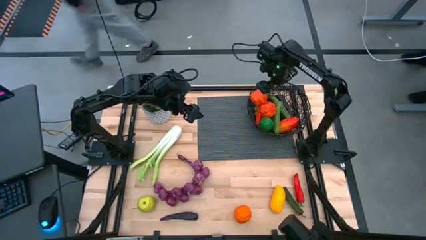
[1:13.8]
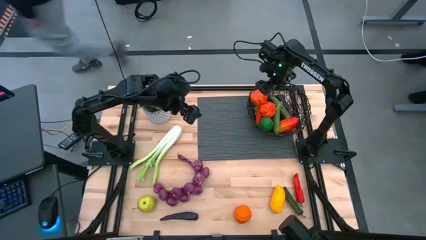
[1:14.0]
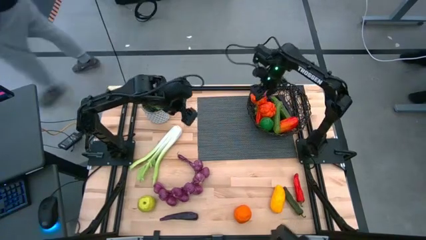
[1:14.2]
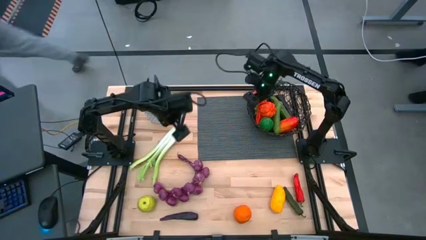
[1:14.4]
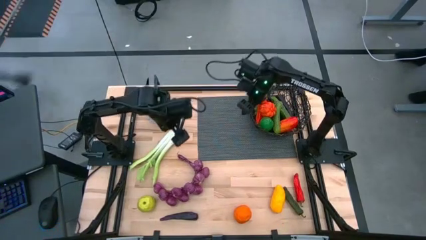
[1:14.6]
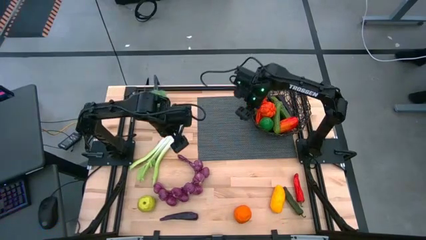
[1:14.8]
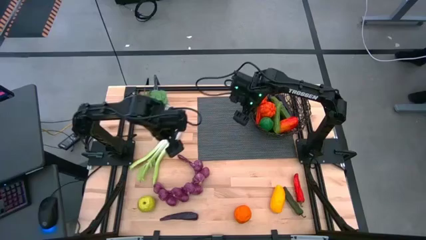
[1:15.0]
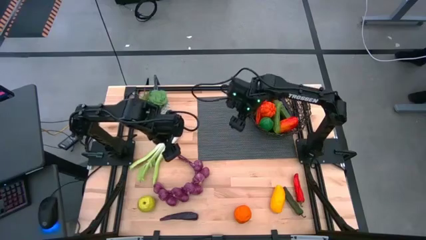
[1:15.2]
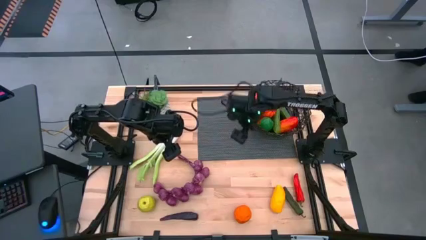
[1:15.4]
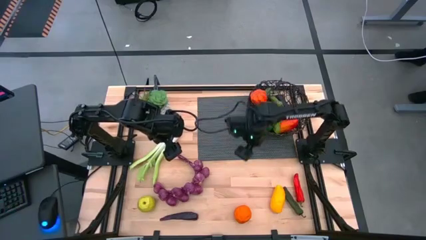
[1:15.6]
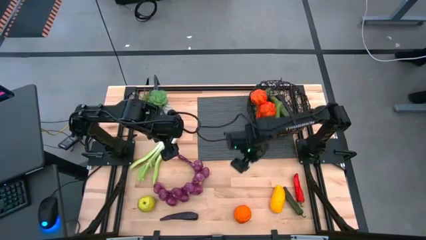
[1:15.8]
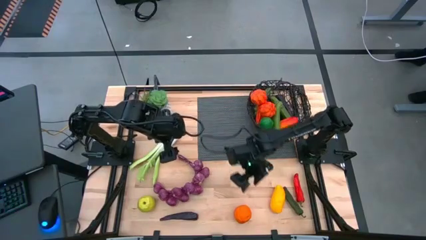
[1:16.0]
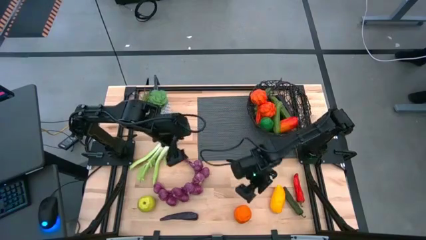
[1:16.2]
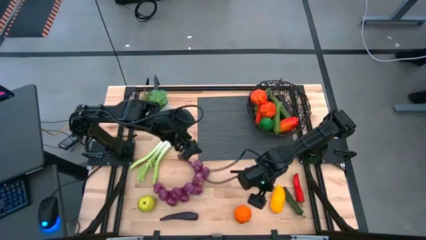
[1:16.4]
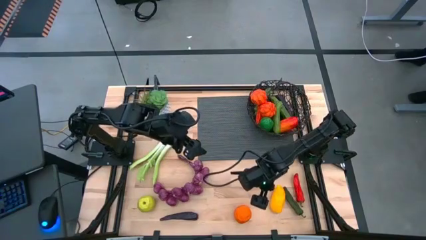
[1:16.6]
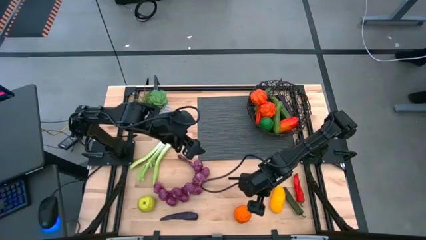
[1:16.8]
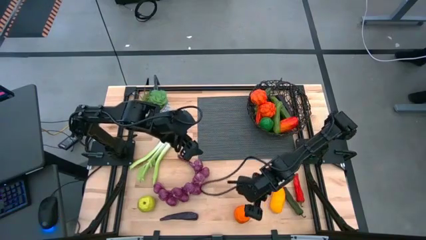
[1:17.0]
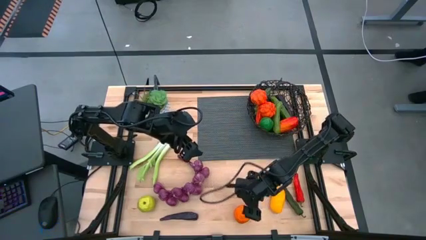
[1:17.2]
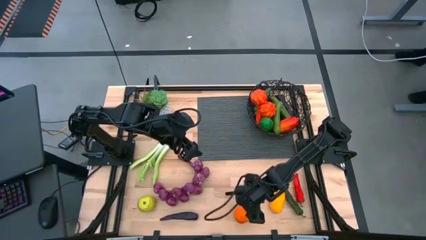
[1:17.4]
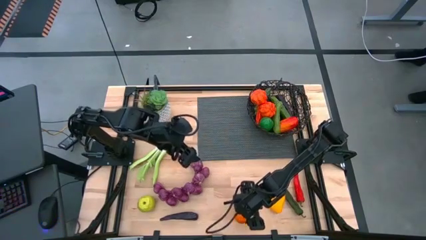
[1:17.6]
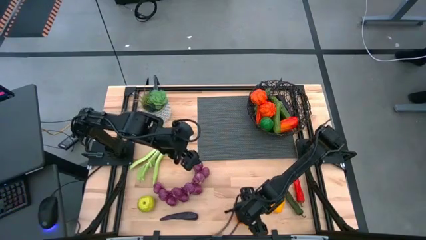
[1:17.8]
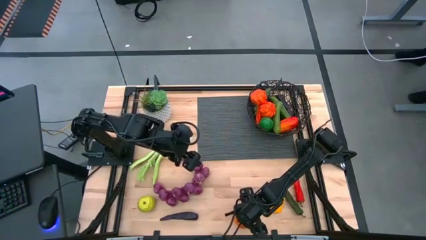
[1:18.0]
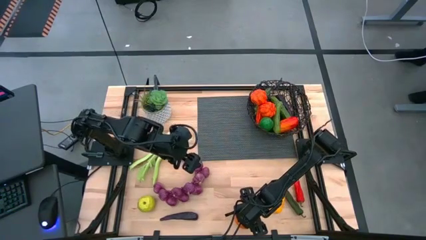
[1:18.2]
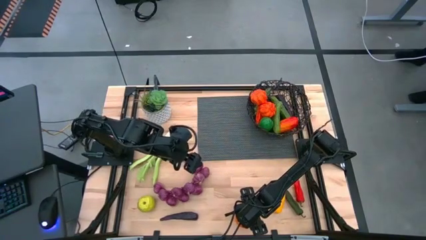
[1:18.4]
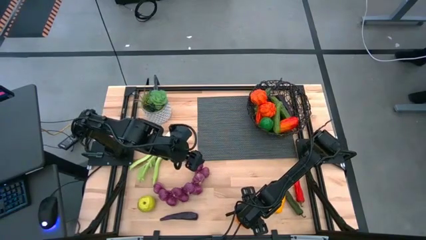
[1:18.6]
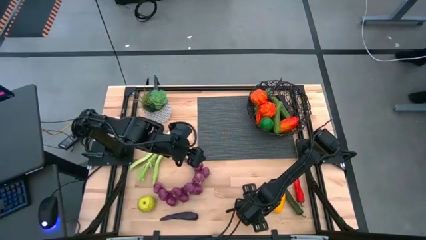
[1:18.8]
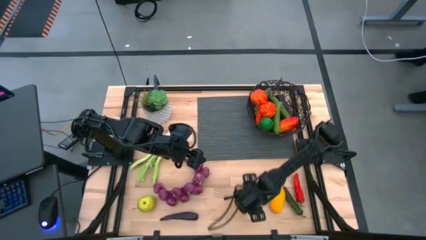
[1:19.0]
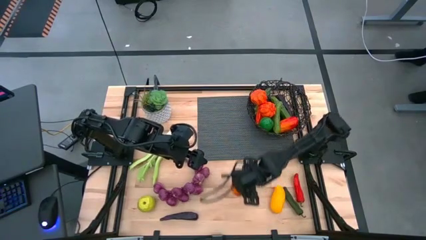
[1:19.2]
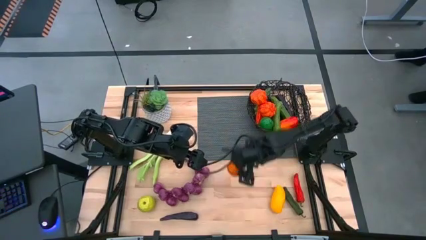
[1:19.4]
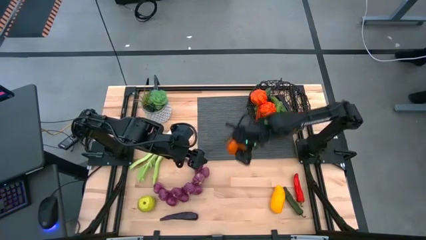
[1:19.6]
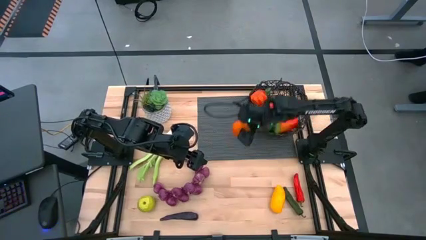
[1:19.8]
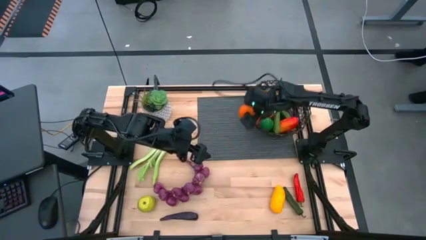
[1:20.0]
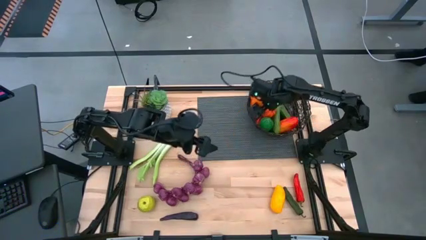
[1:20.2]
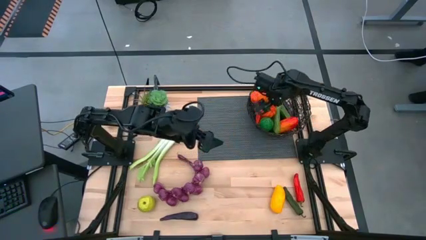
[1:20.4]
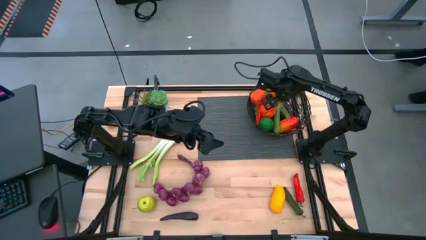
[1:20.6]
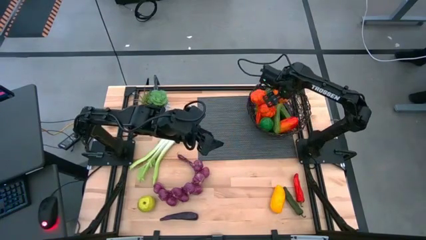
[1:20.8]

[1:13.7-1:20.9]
Task: Build produce basket
Put the orange into the black basket

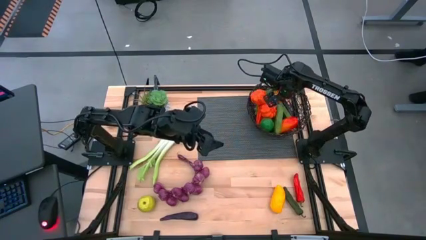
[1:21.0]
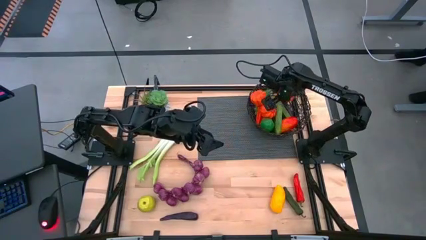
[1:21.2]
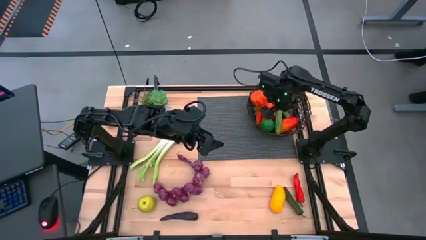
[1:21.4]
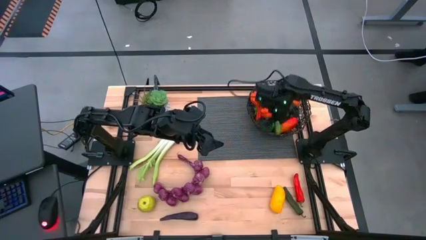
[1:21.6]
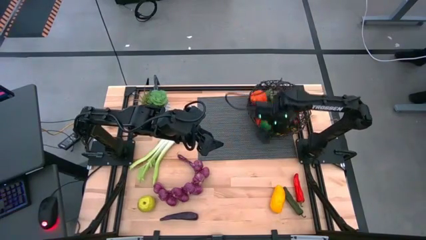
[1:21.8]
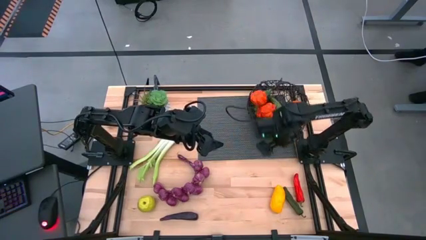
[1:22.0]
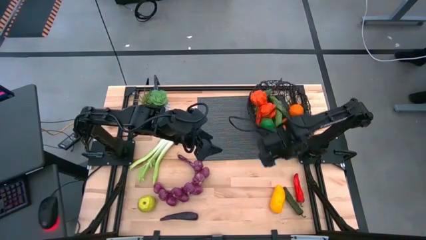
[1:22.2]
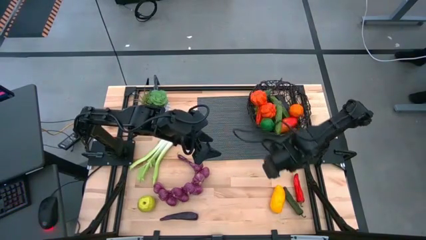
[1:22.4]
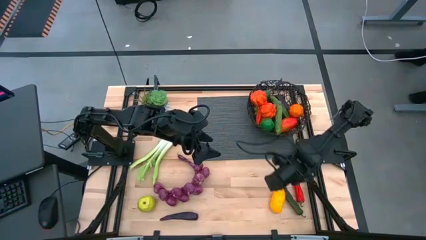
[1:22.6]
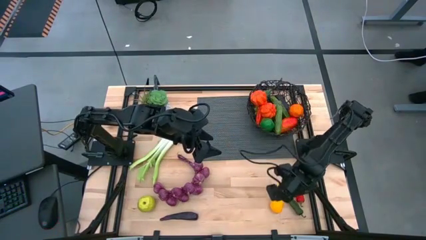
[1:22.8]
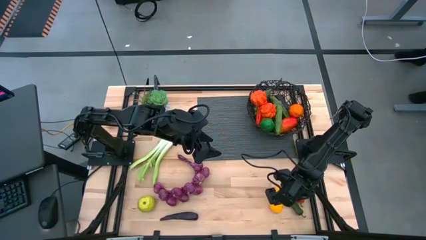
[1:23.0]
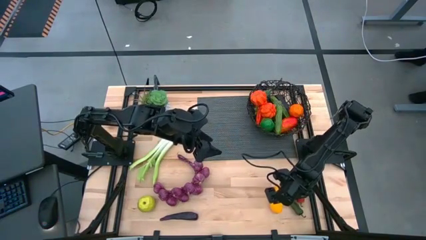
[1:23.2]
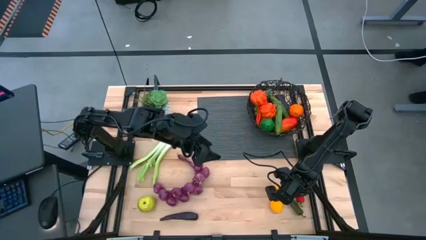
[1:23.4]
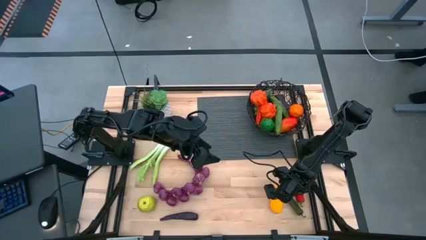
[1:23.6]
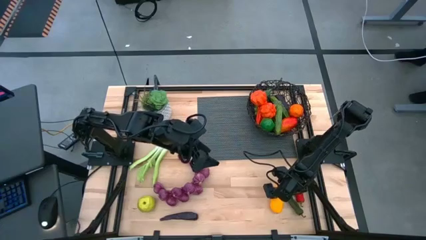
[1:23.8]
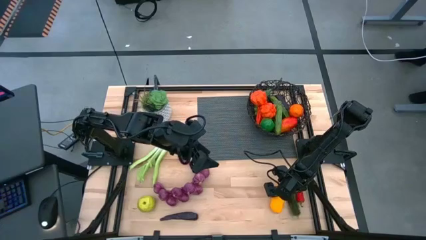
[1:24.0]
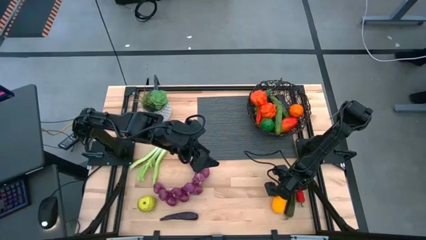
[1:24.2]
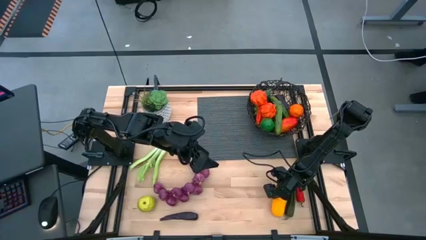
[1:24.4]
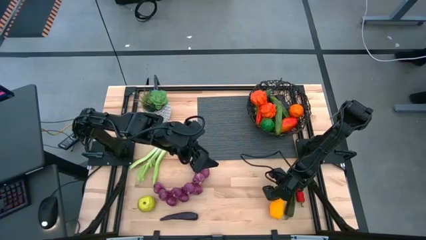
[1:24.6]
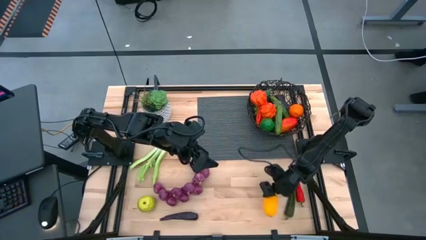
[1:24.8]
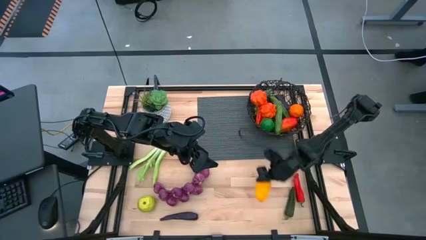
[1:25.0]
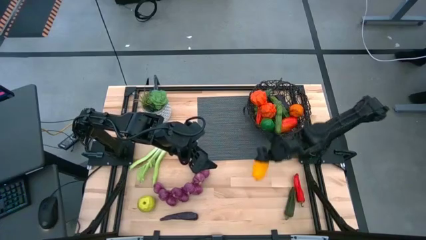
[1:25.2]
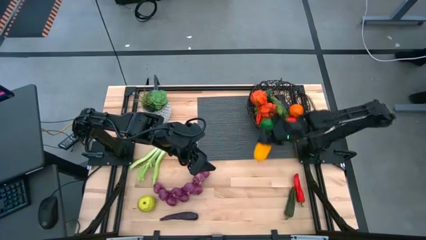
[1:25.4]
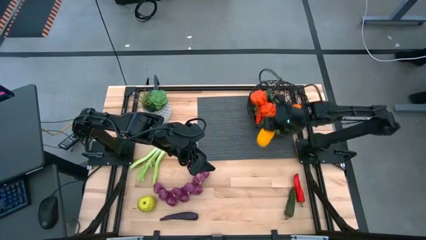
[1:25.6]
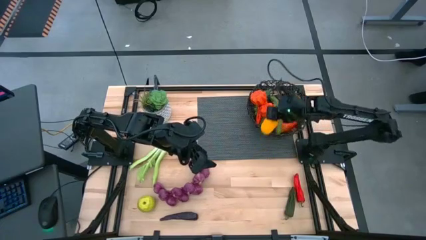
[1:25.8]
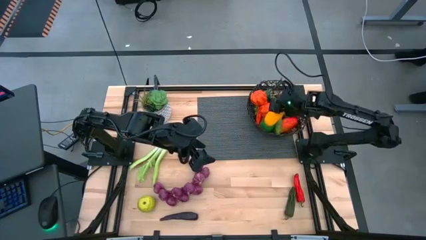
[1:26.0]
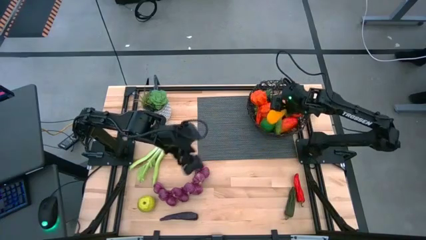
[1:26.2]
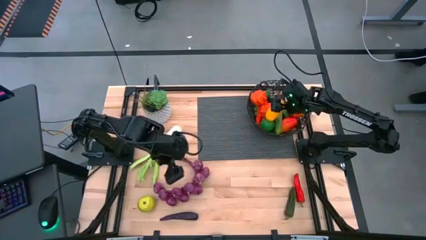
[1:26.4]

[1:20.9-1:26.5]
Put the yellow mango into the black basket

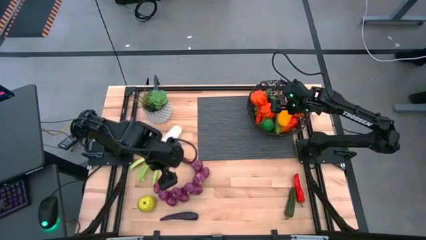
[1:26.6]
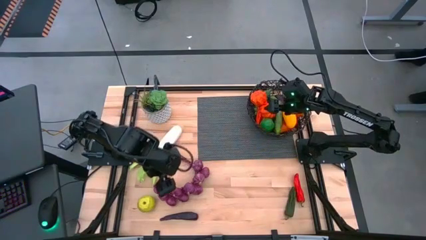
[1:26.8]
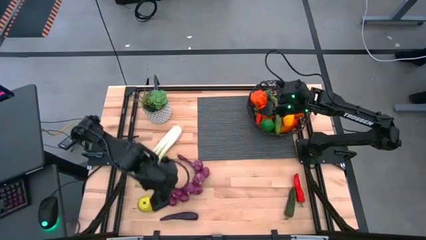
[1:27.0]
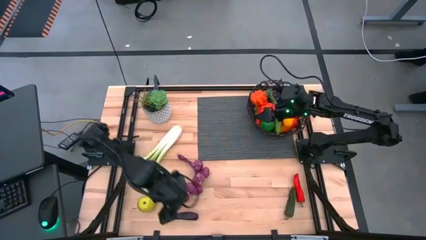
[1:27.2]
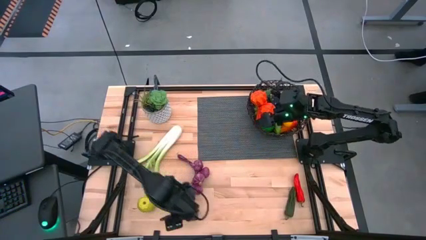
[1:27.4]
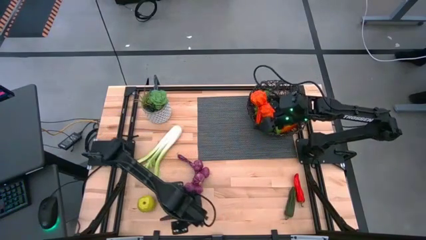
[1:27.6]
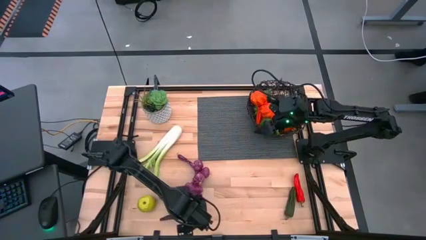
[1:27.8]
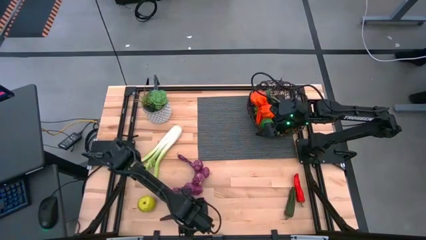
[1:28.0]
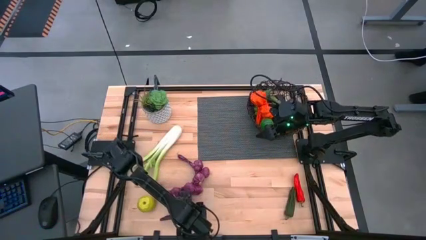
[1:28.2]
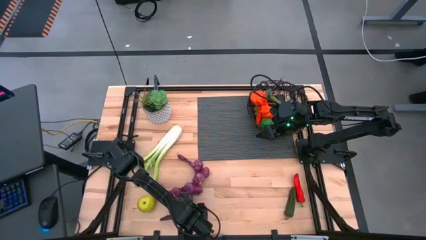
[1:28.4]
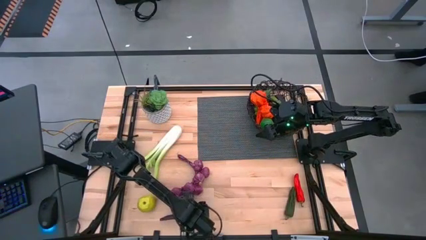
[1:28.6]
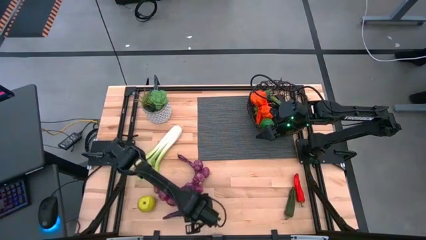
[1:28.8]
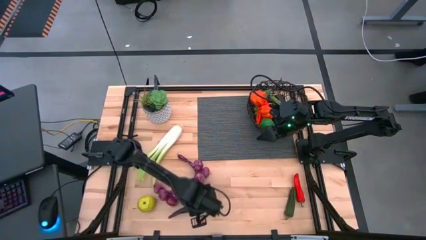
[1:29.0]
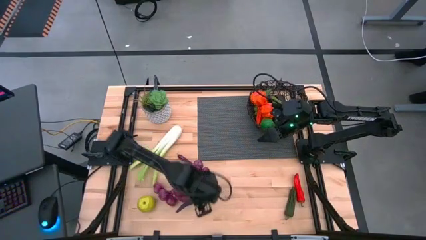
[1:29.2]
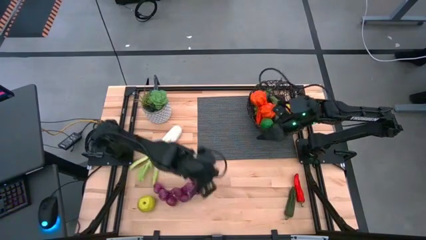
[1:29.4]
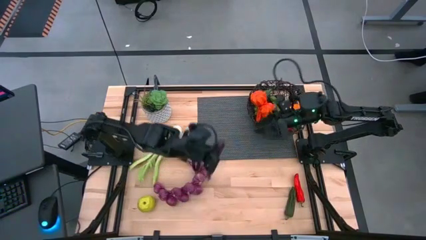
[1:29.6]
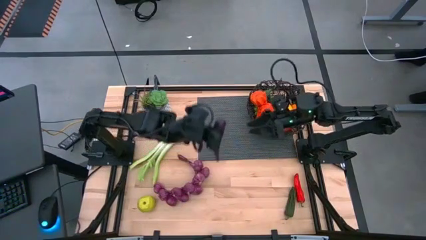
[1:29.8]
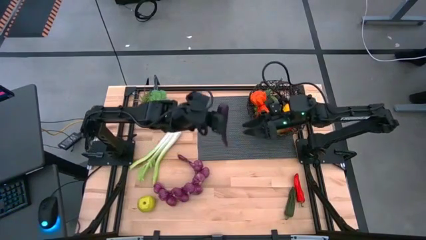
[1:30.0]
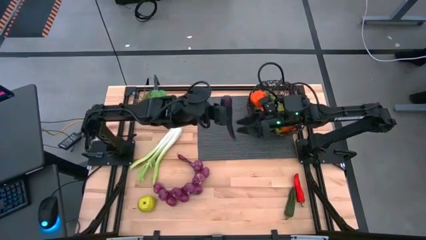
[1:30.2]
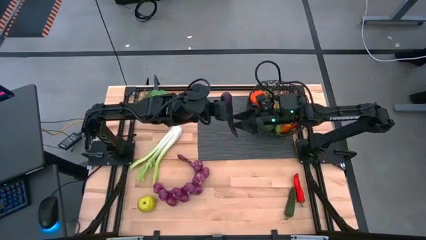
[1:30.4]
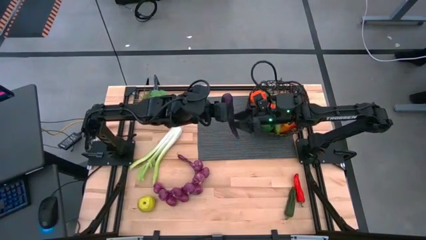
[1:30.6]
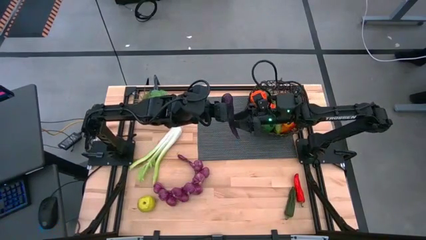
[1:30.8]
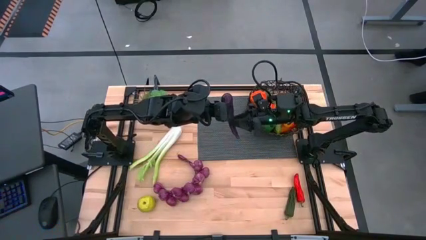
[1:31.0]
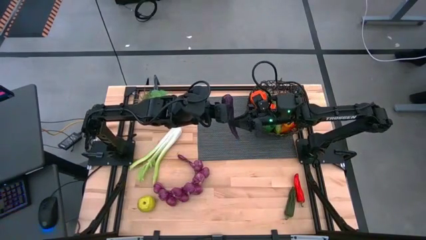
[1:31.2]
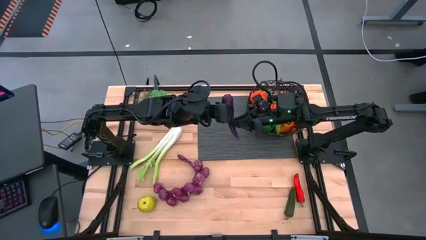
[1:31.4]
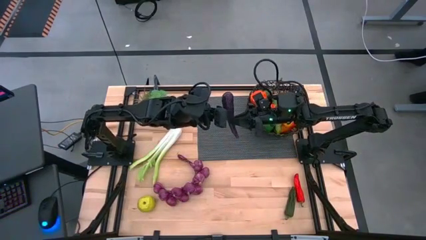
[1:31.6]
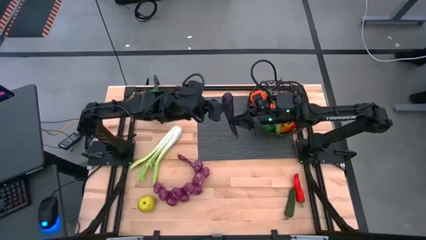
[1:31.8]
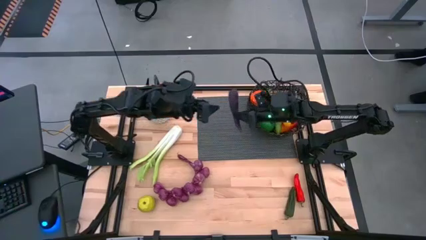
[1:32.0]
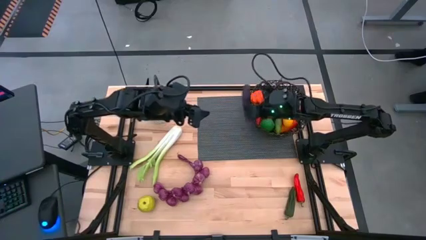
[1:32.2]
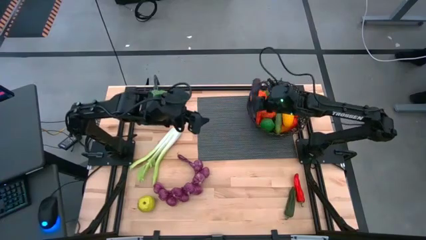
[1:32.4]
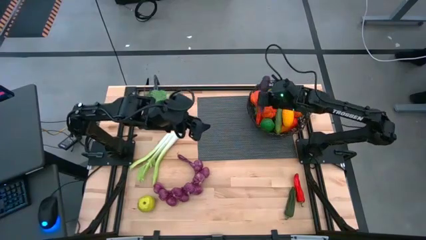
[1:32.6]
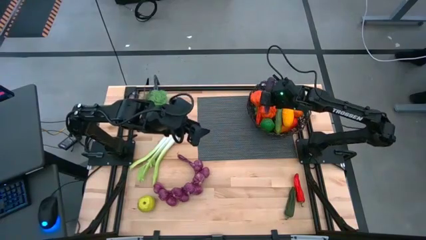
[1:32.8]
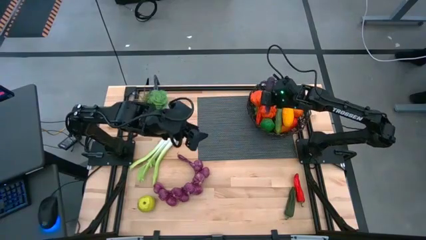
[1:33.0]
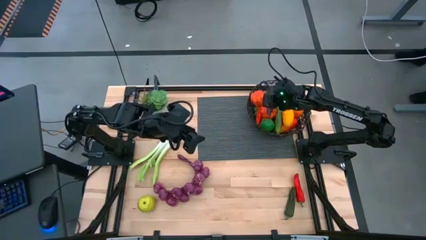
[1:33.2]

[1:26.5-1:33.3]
Put the purple eggplant into the black basket
